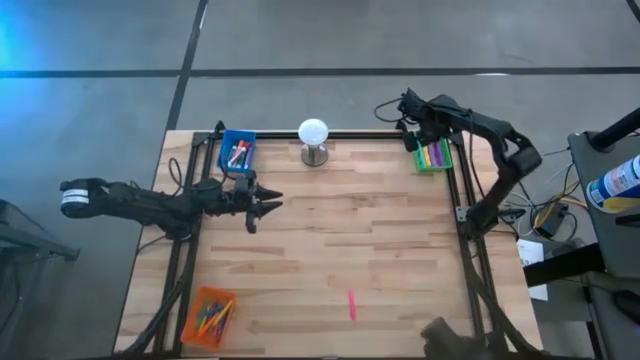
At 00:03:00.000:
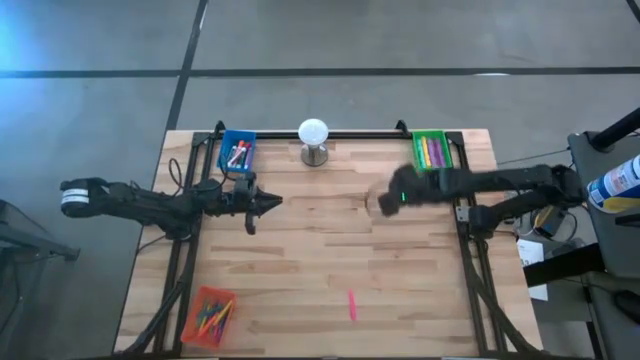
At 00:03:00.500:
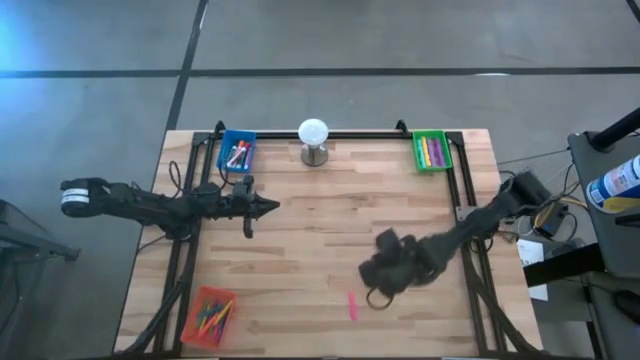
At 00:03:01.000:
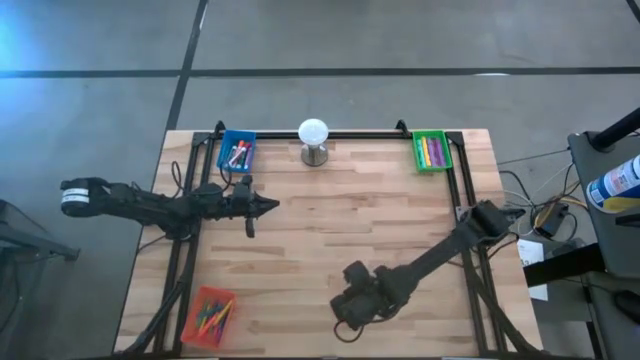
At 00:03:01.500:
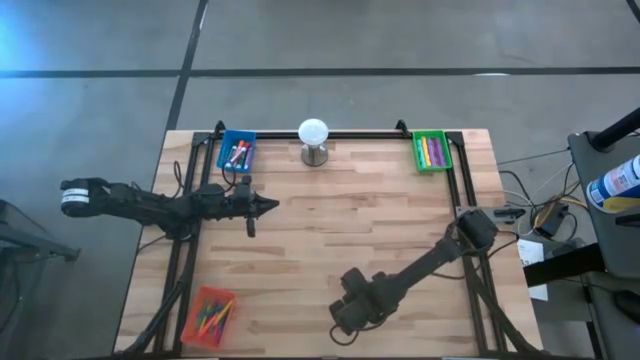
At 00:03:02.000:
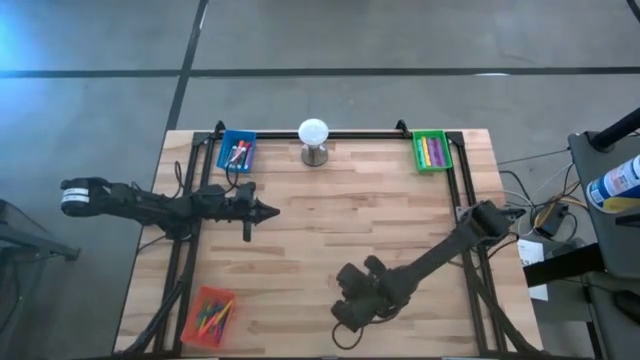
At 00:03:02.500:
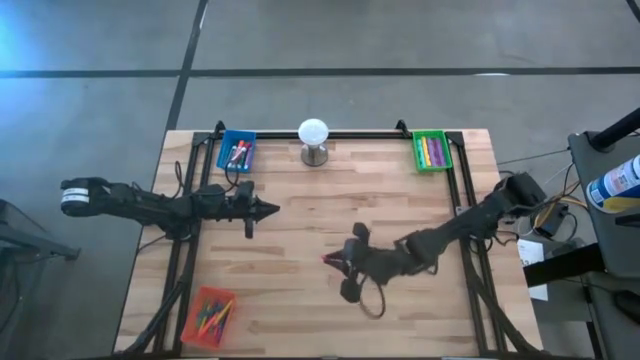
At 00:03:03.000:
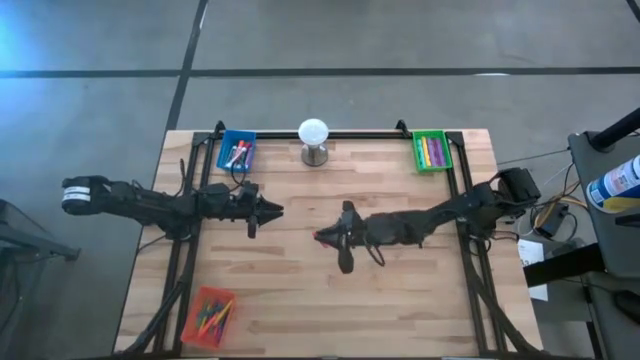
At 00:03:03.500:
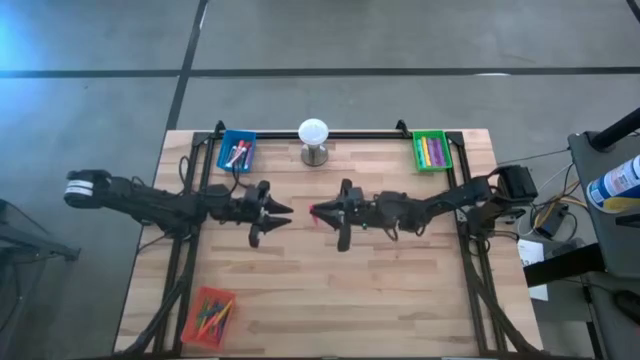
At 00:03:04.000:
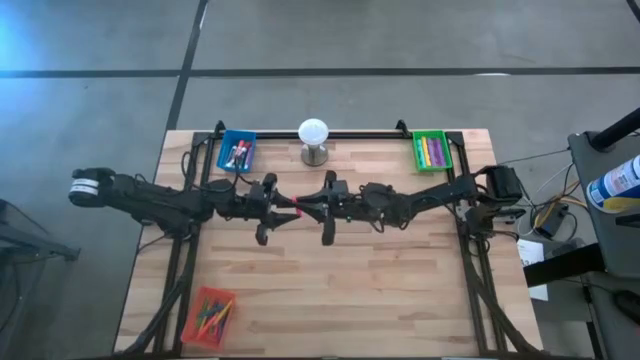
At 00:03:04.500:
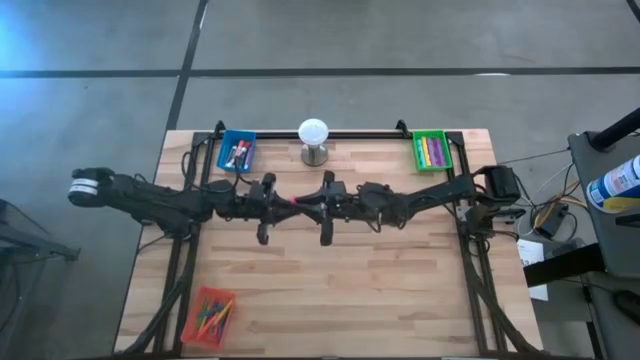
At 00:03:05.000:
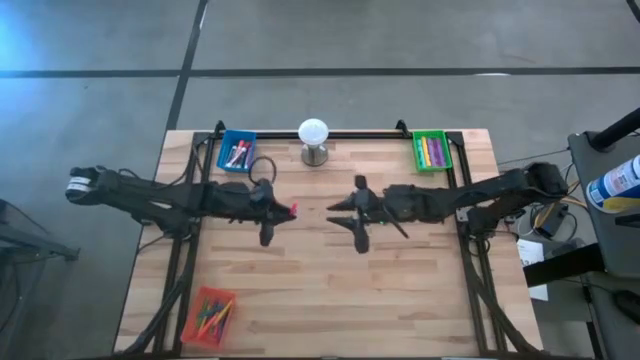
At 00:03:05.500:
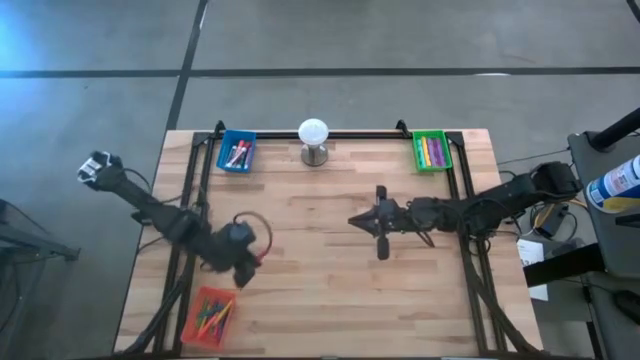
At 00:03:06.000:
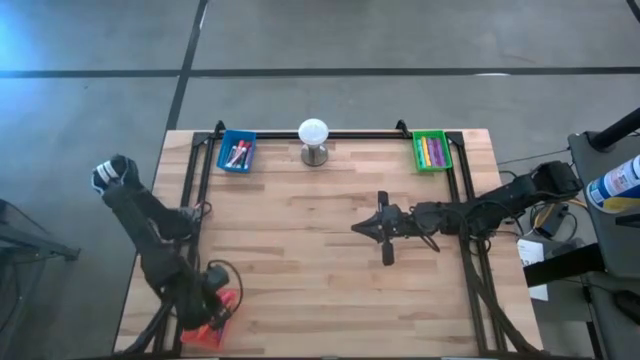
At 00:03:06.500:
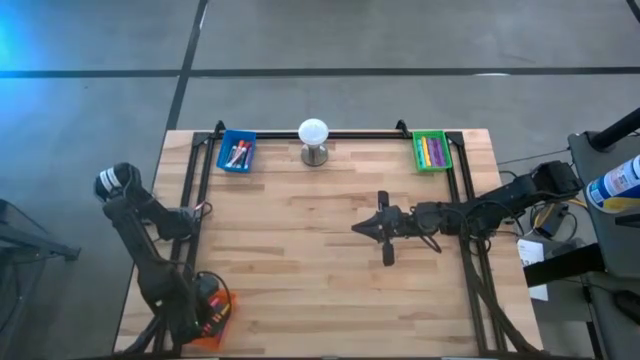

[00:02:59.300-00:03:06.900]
Task: Pick & Place Markers
Put the pink pen into the orange bin

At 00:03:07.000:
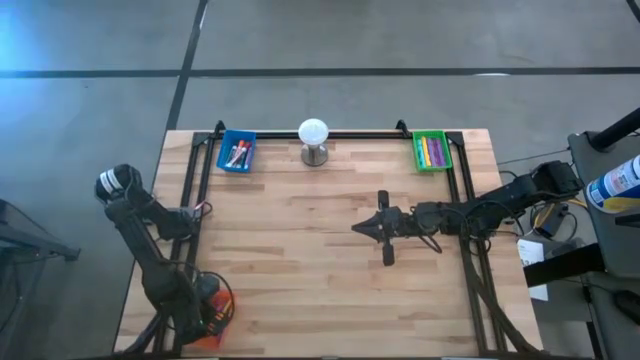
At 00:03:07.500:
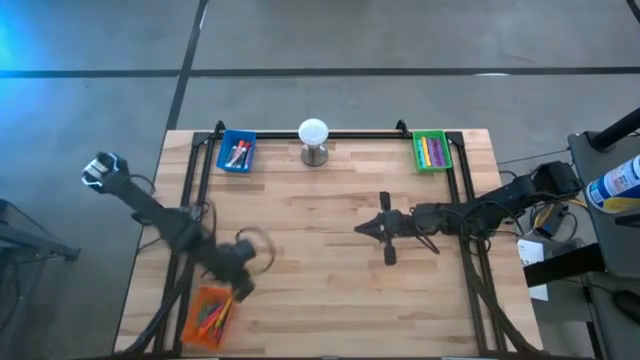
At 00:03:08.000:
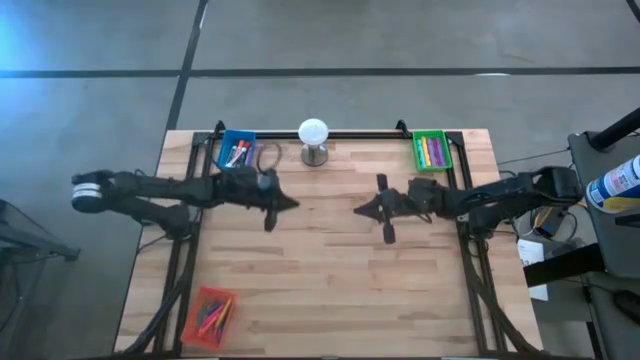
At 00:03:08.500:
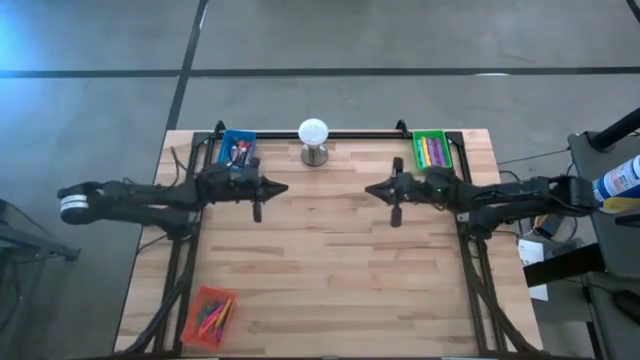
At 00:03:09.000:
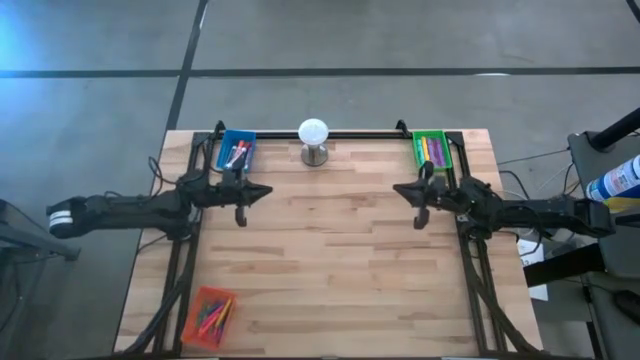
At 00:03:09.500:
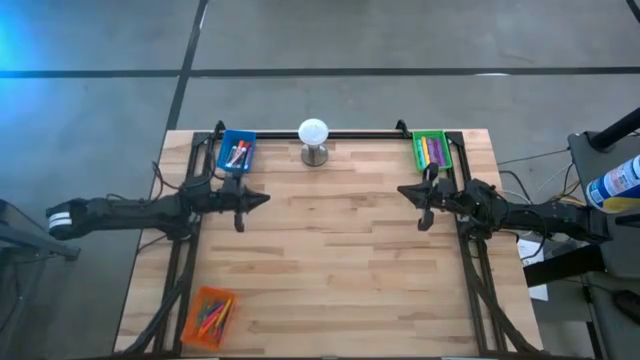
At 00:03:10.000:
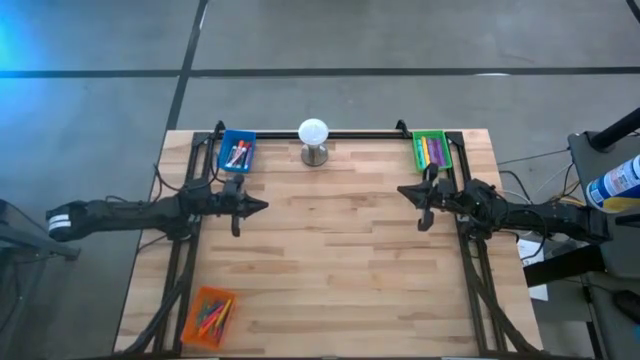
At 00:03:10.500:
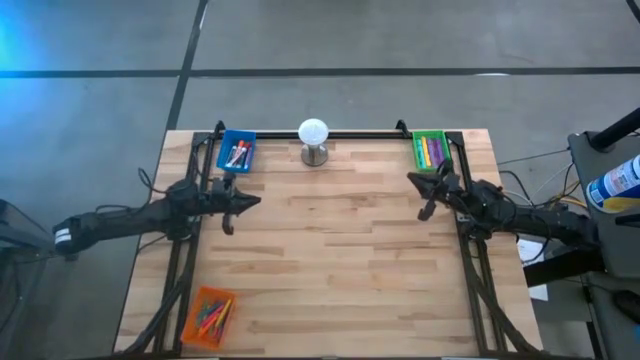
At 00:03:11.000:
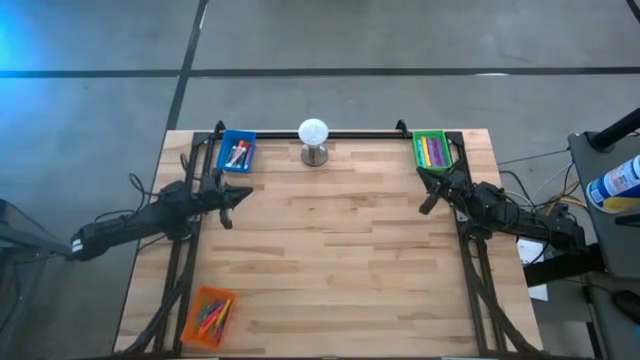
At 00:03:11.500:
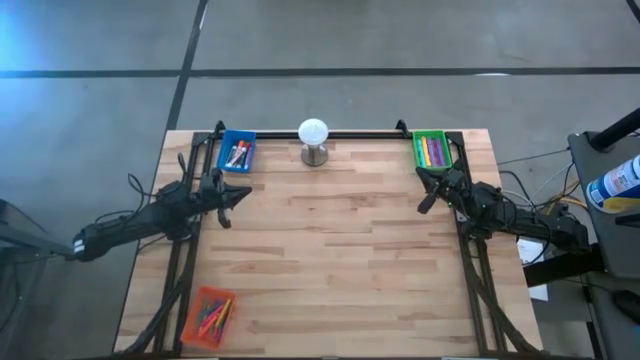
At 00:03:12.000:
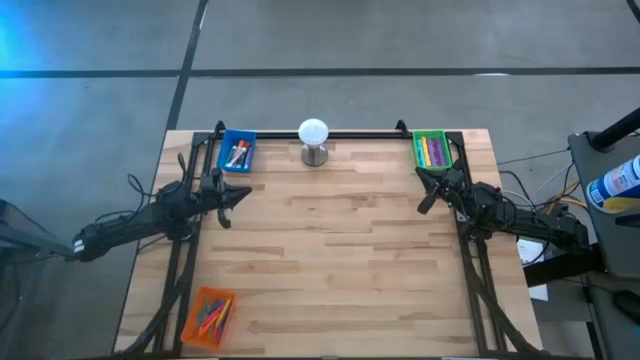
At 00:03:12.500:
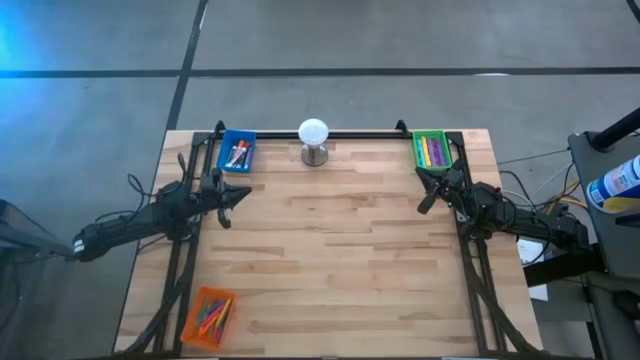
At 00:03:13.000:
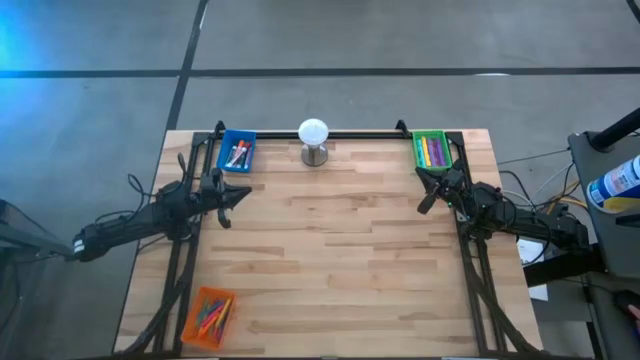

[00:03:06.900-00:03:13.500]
Return to Home Position

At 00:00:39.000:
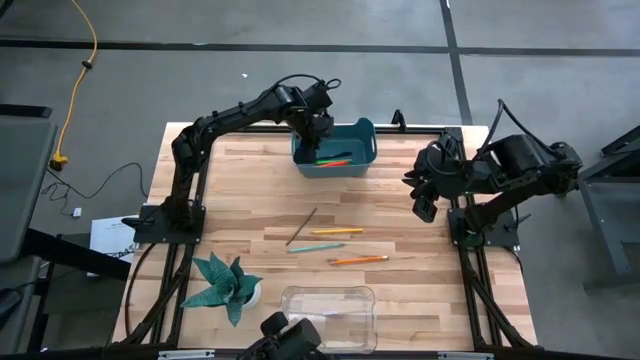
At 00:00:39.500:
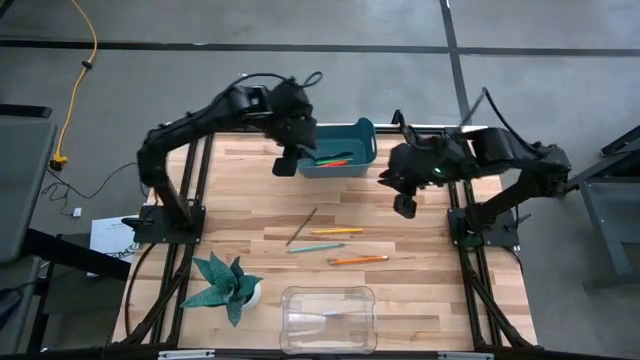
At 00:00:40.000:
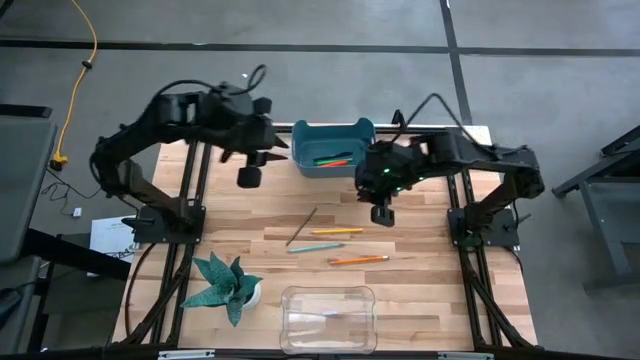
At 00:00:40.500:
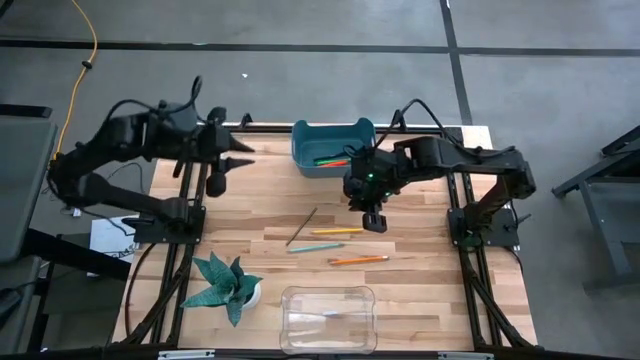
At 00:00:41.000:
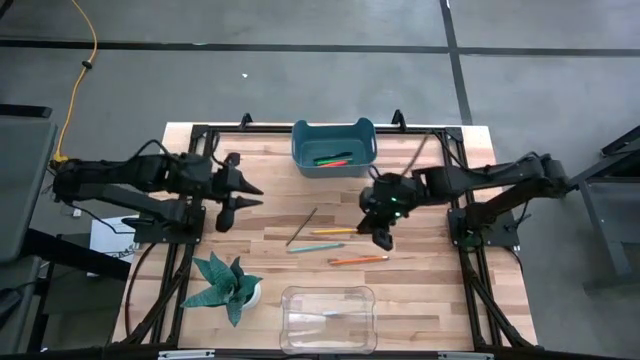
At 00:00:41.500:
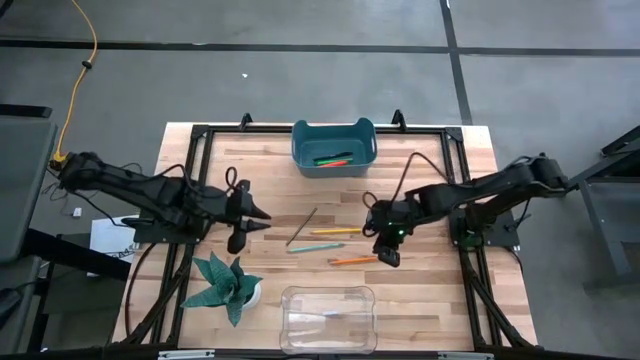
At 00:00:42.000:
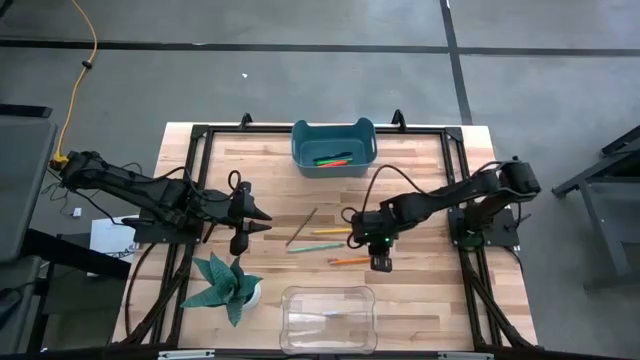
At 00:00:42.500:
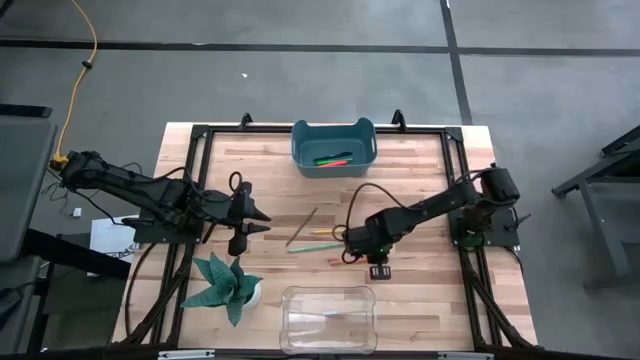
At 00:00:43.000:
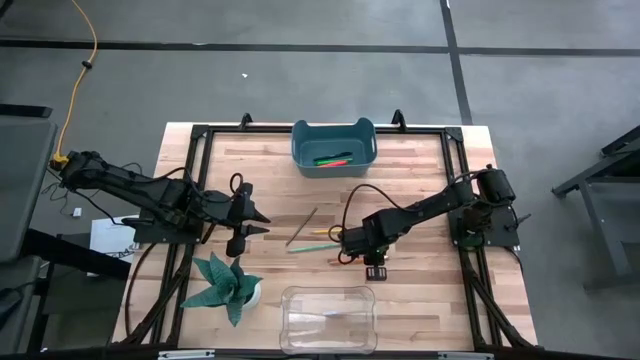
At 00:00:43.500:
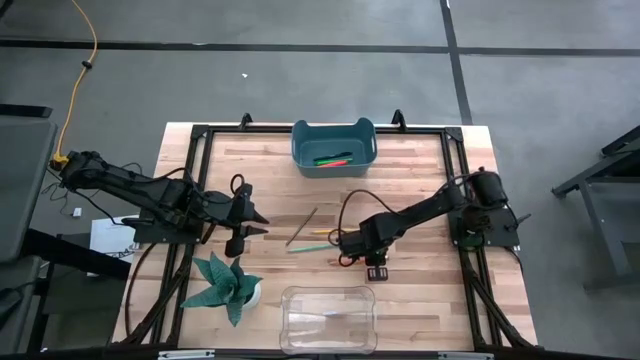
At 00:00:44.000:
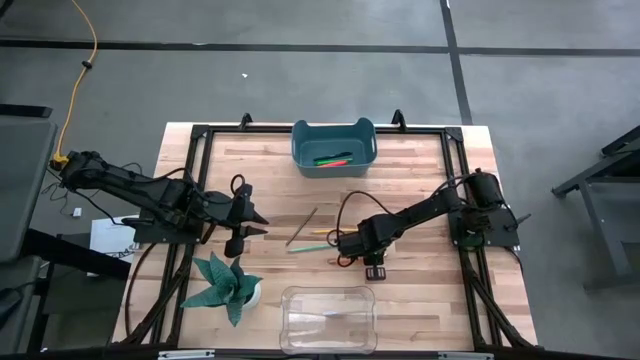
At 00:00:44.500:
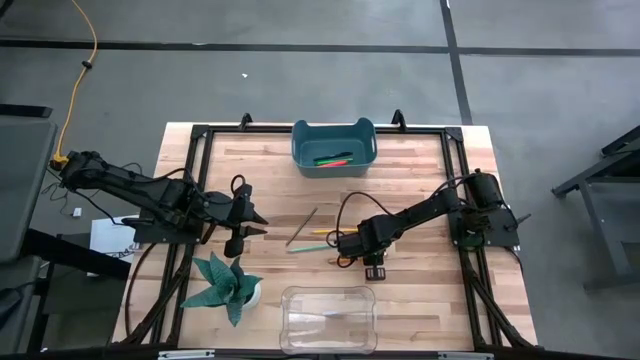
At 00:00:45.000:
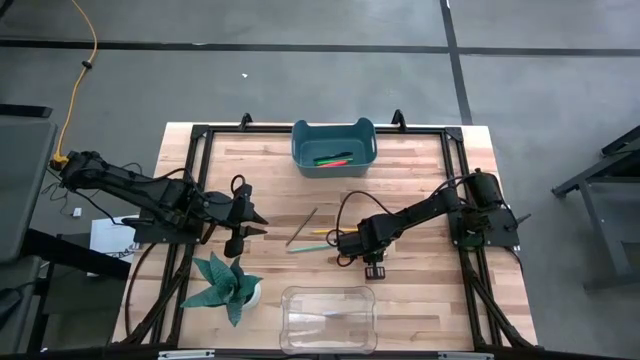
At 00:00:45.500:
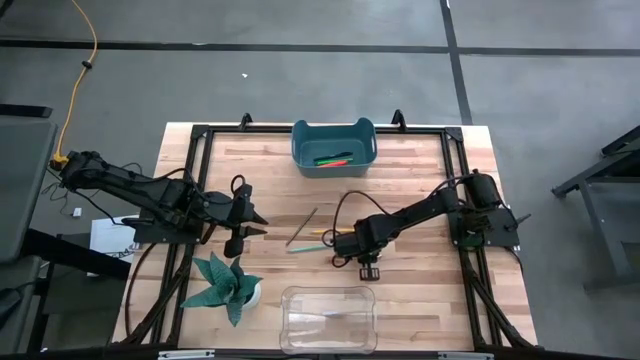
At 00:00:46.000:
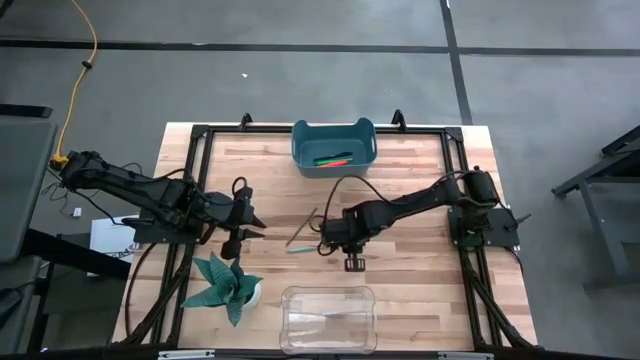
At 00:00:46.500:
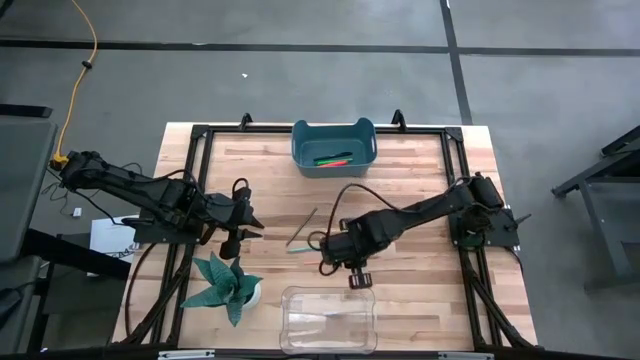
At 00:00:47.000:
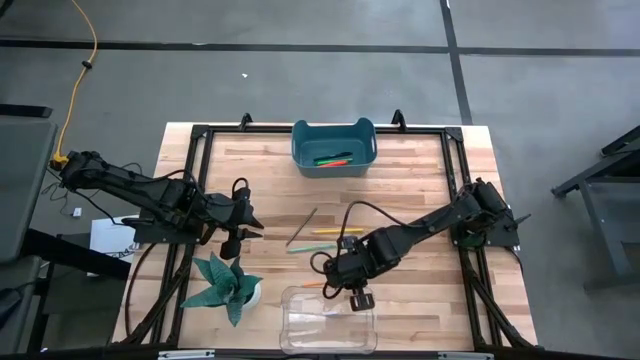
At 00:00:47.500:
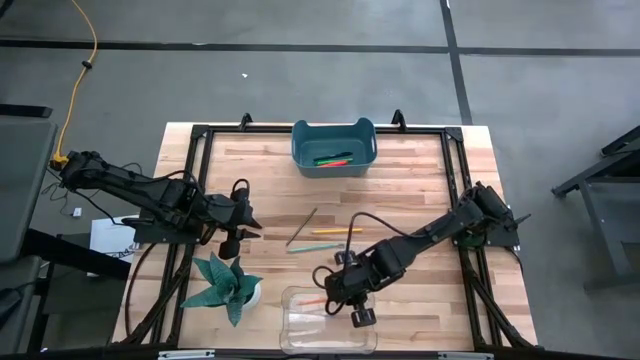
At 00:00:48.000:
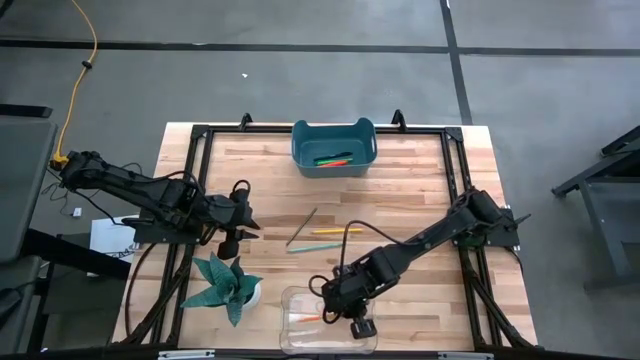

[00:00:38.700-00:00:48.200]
Task: Sort pens & pencils
Put the orange pencil into the transparent bin
